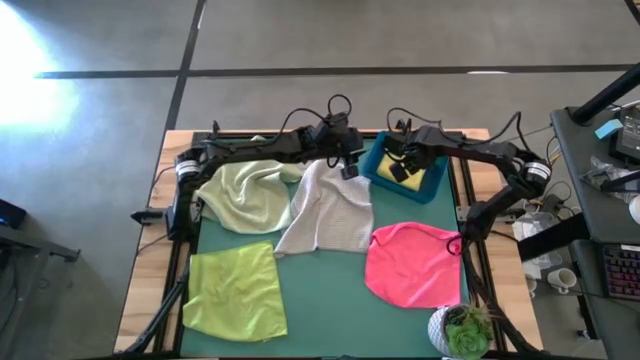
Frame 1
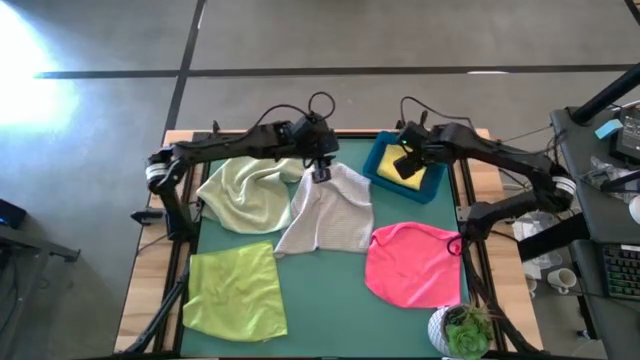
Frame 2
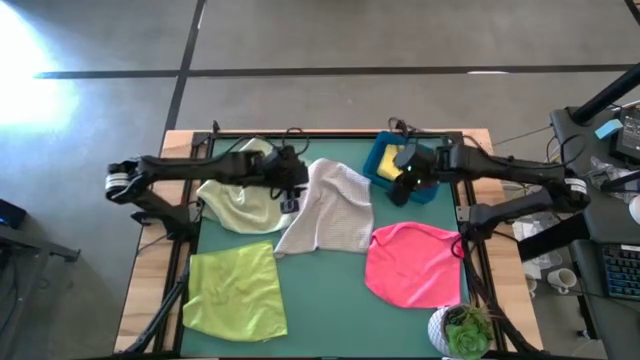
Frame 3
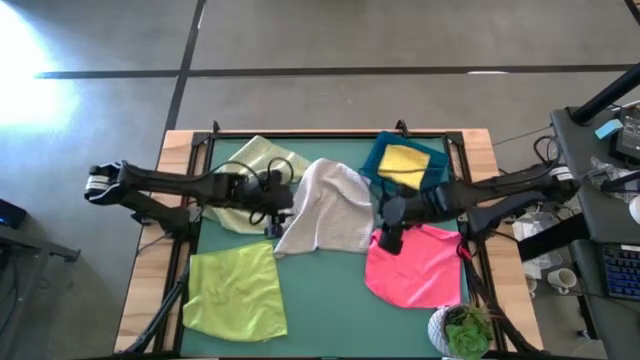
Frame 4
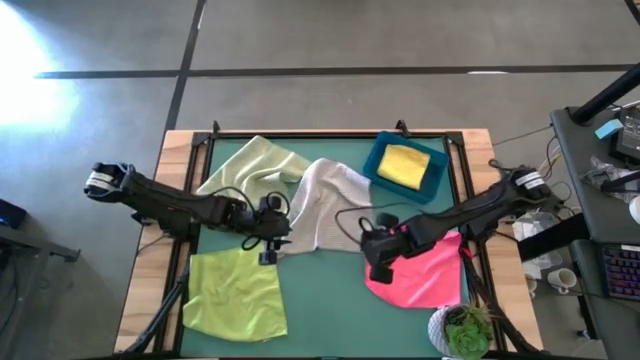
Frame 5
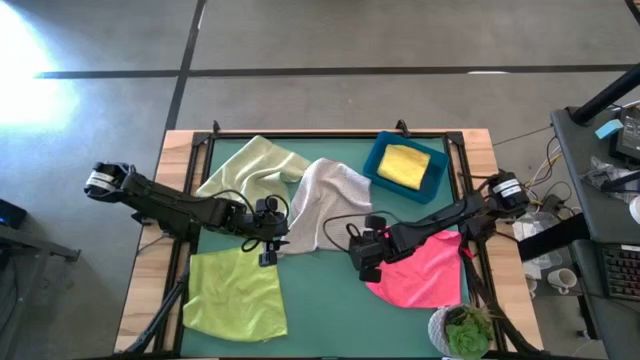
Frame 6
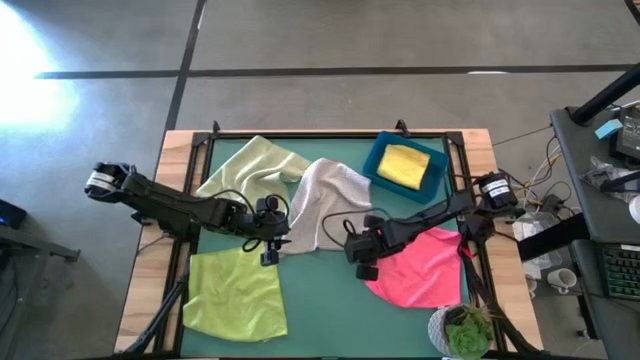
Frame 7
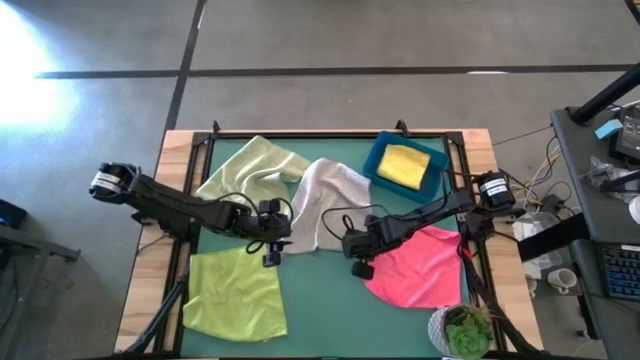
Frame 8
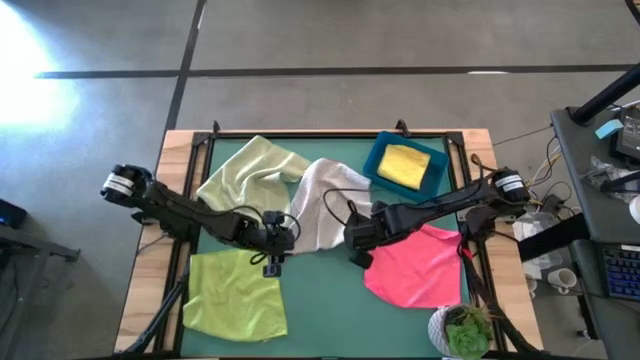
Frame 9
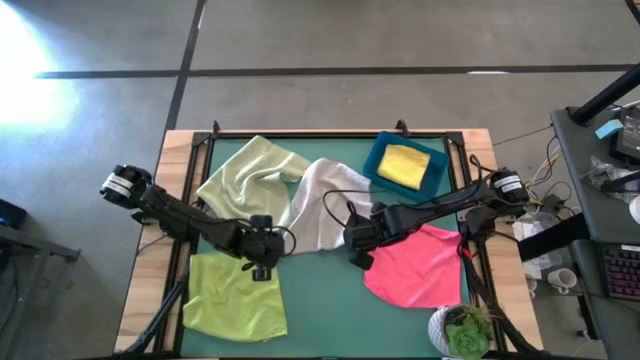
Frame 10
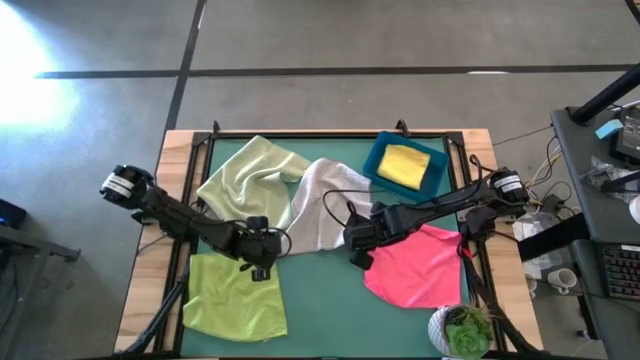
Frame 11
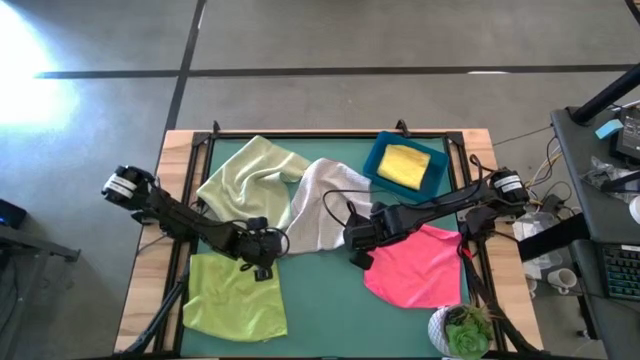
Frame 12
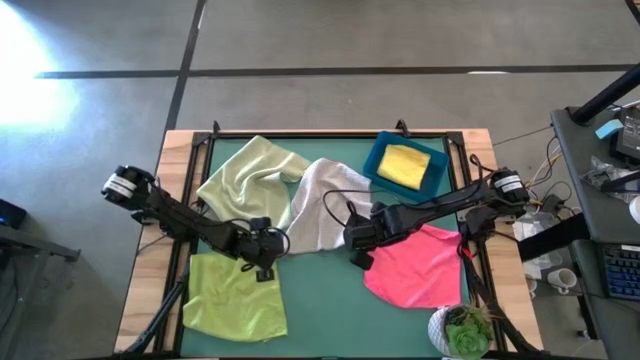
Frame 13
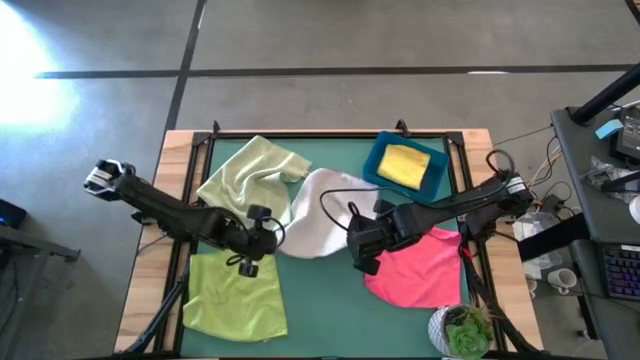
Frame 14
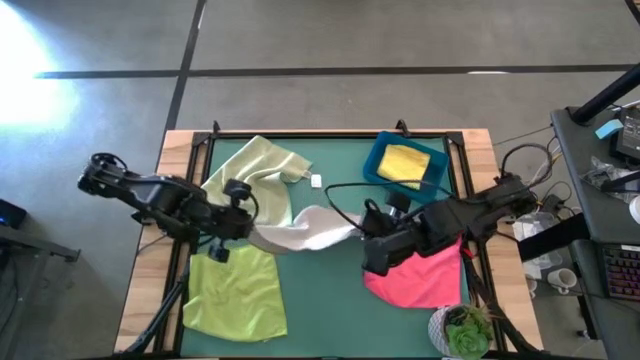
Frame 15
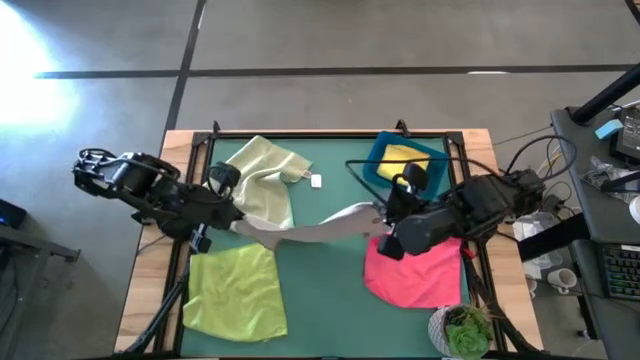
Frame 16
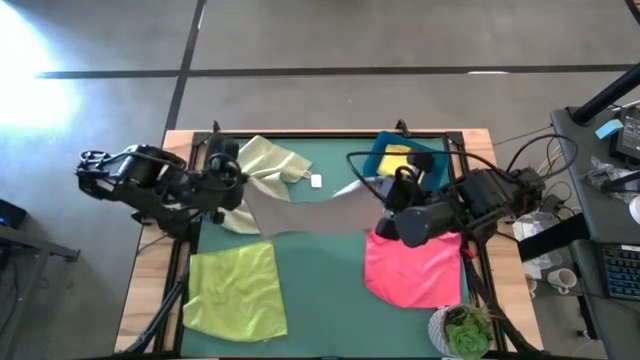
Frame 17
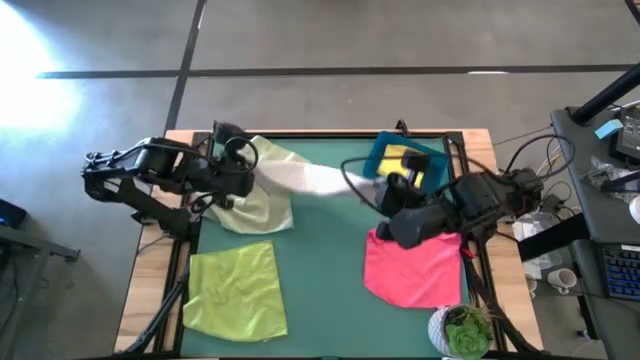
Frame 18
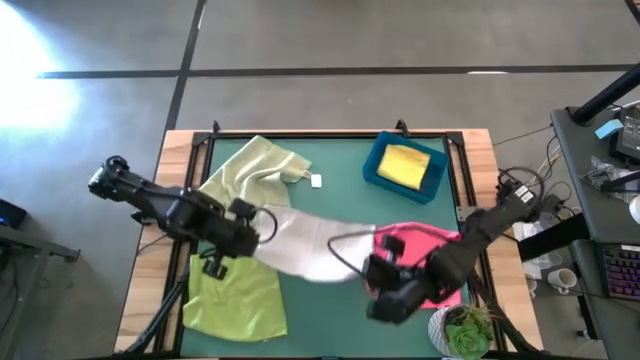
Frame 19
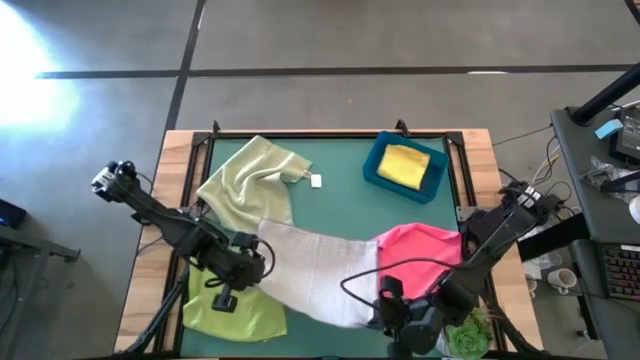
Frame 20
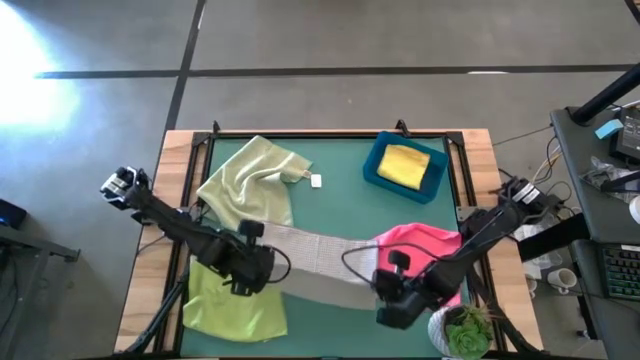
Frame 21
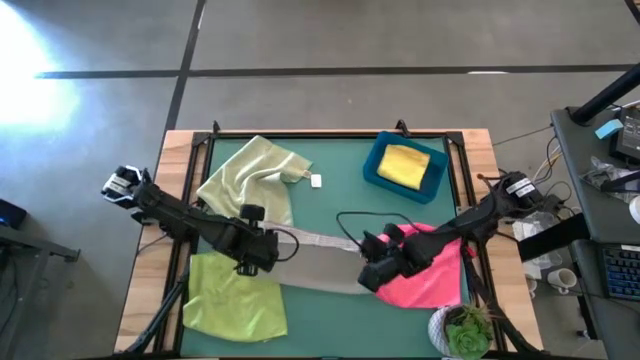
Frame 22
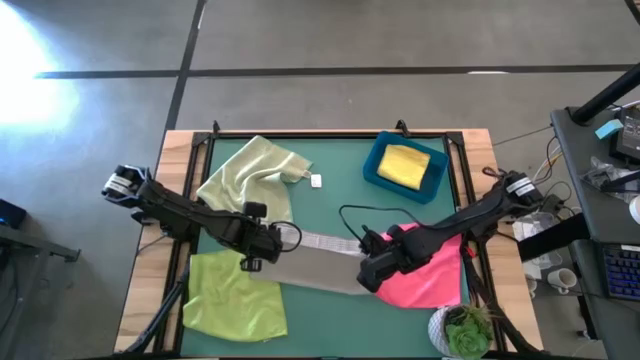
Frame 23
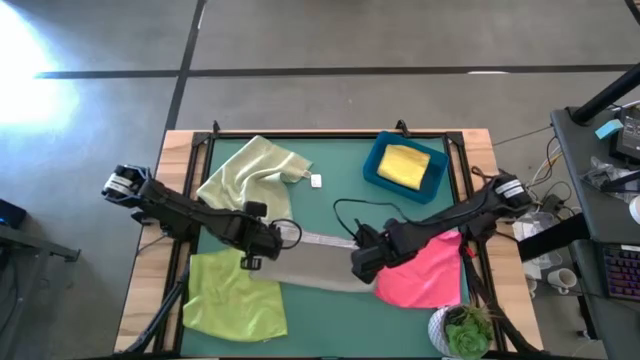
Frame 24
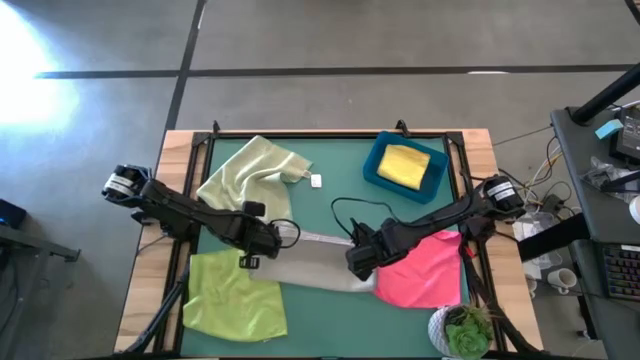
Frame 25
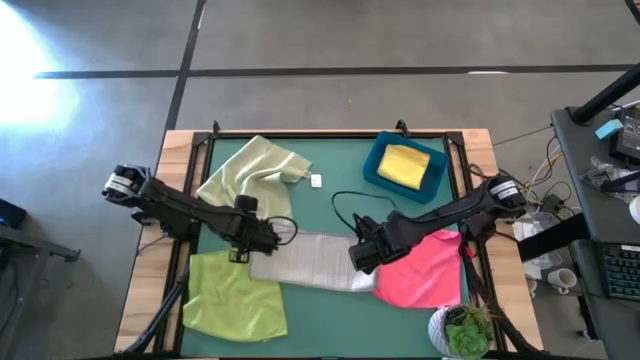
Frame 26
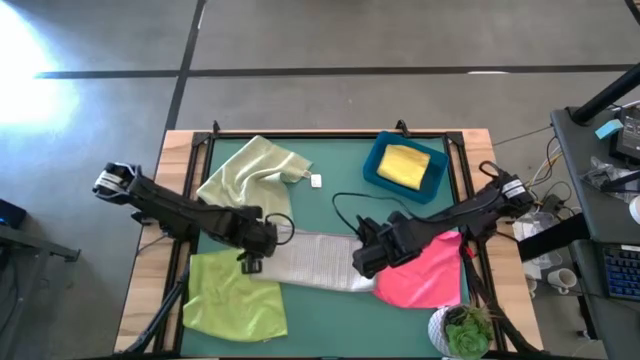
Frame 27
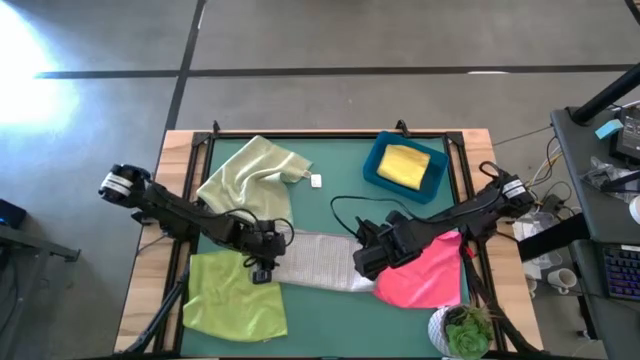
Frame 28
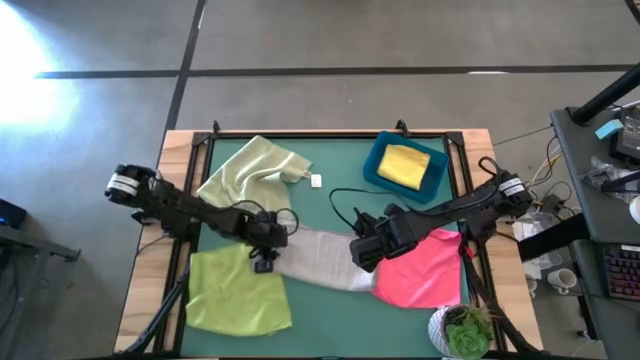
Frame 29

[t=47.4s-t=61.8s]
Task: Fold microfiber towels
Fold the gray microfiber cloth

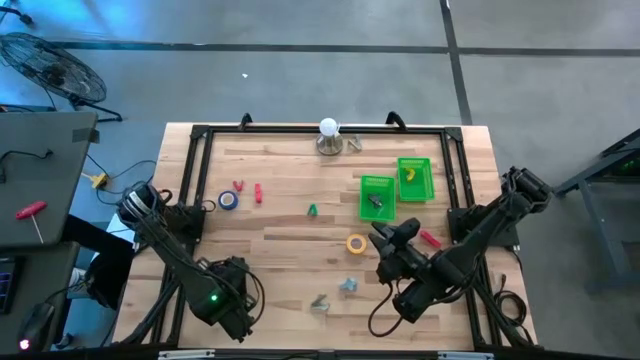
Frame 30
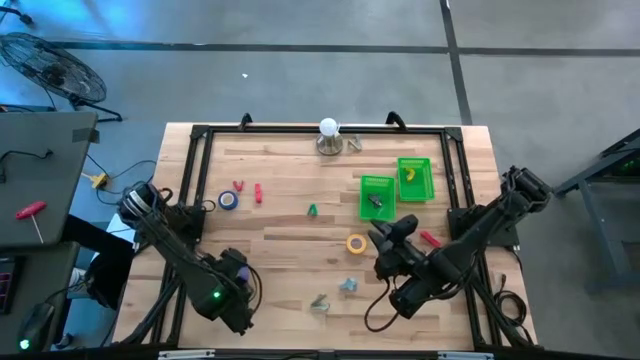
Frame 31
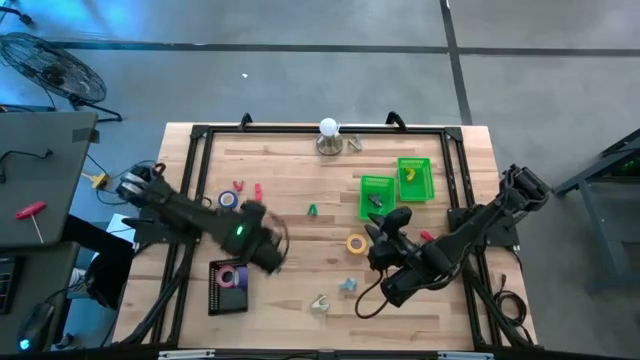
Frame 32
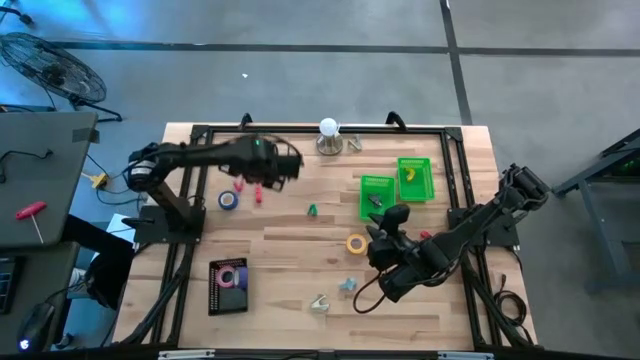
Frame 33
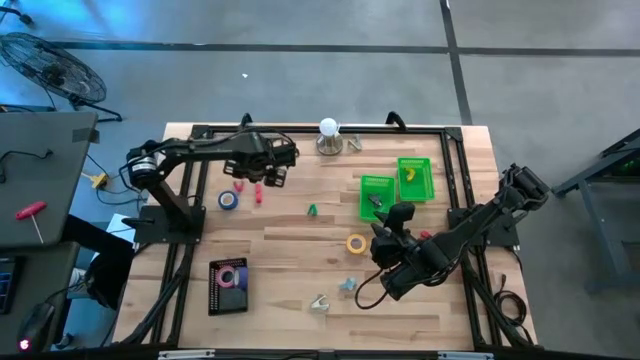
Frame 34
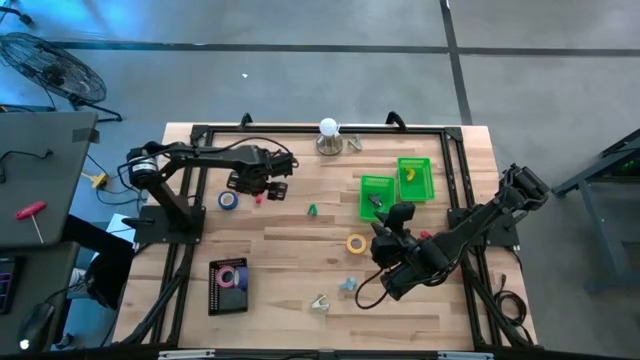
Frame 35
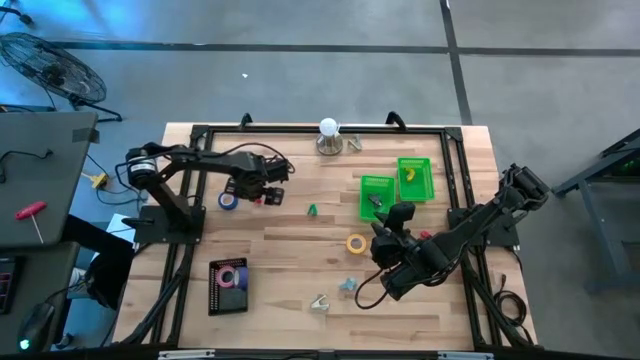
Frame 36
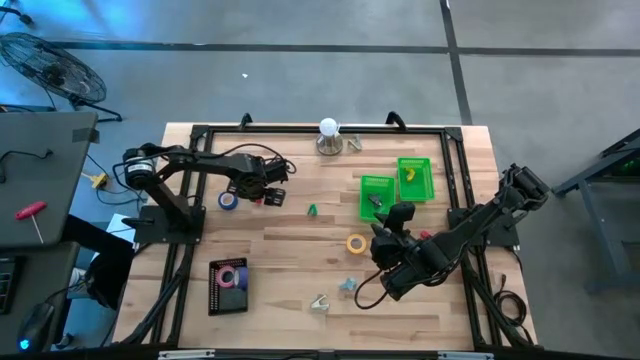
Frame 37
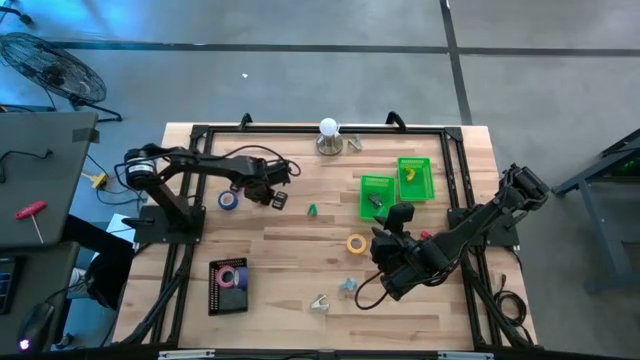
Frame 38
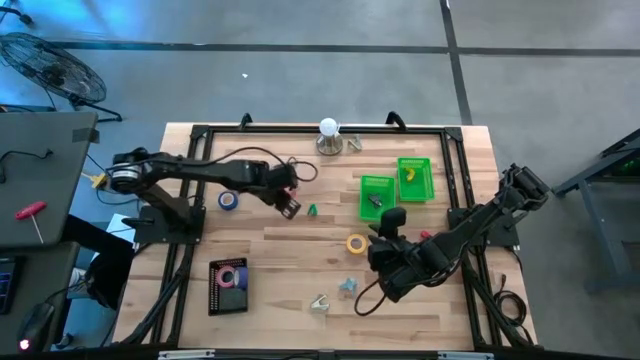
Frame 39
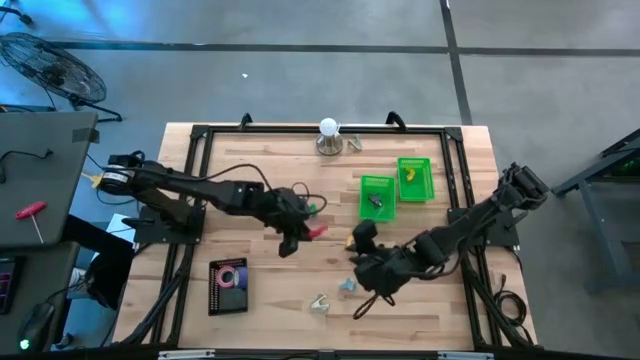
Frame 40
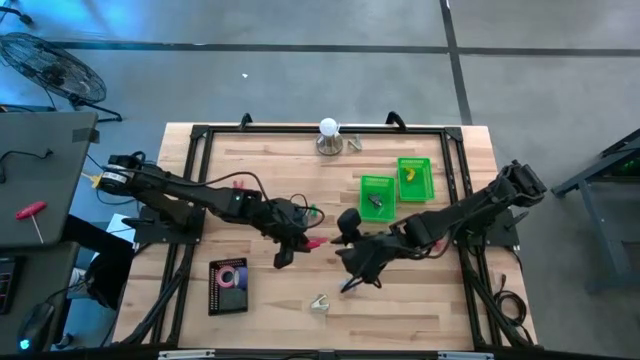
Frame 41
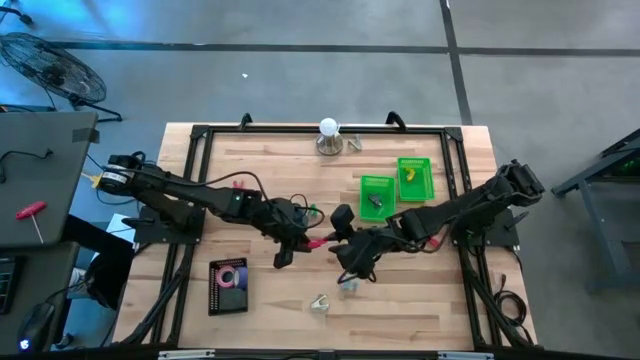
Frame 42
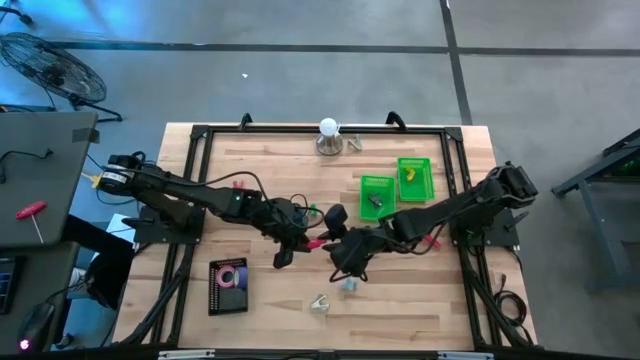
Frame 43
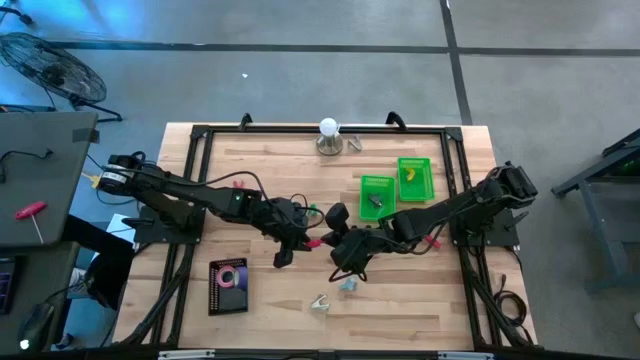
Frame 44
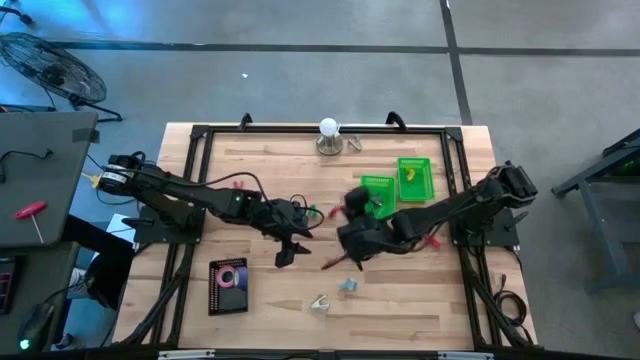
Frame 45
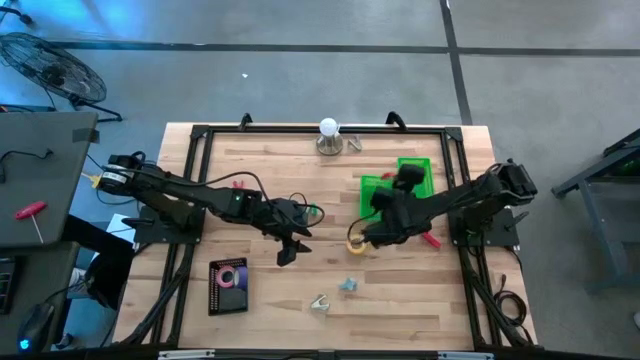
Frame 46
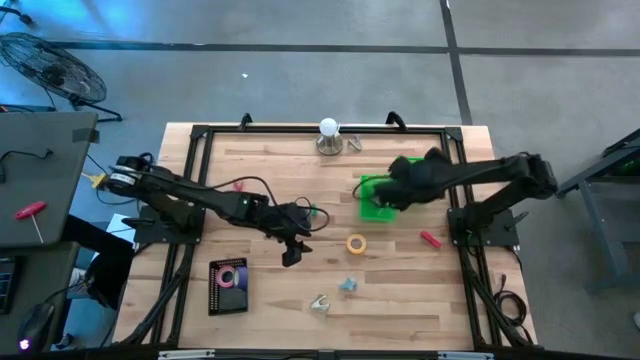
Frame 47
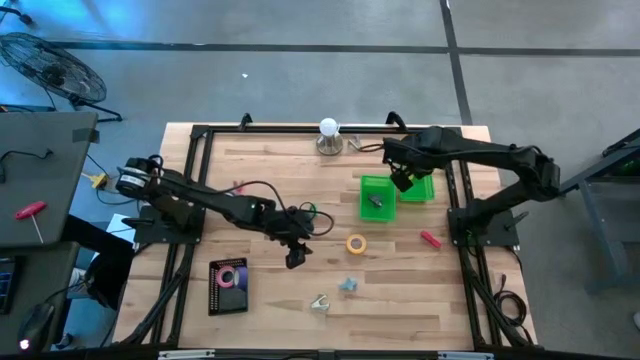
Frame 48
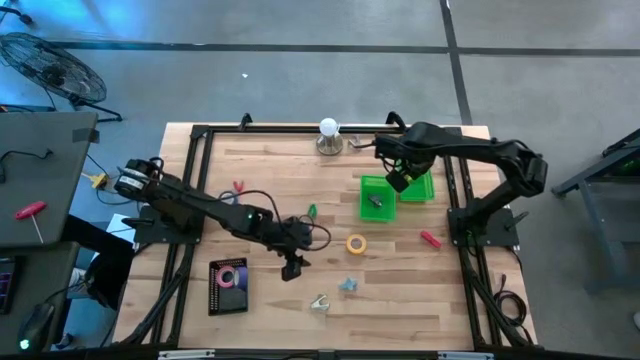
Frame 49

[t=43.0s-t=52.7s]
Task: Pick and place Stapler, Stapler remover, tape
Put the right red stapler into the right green basket
